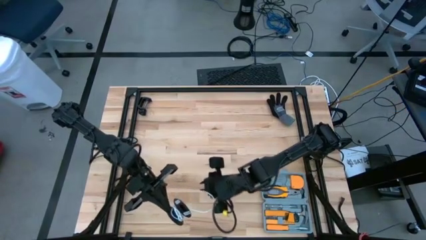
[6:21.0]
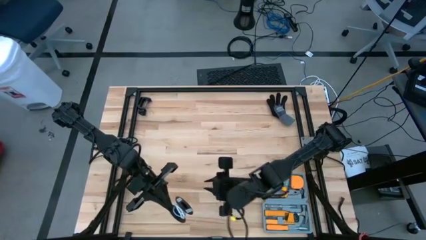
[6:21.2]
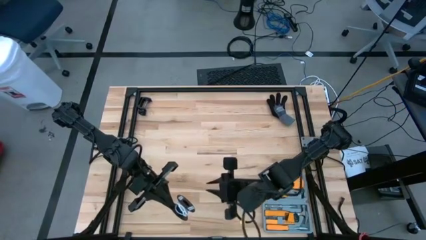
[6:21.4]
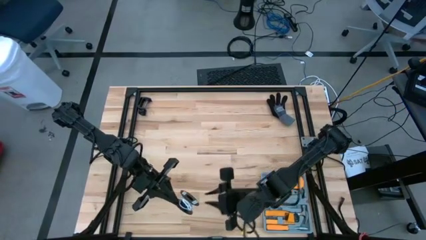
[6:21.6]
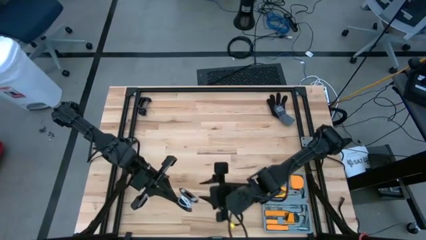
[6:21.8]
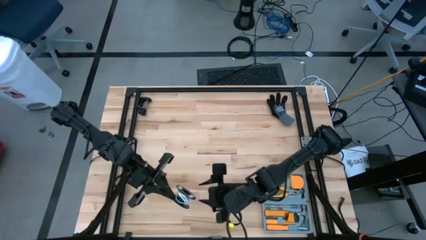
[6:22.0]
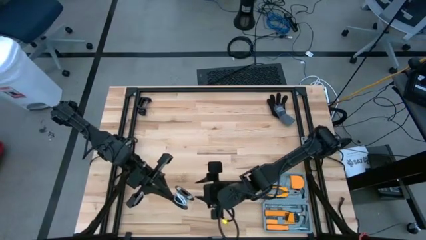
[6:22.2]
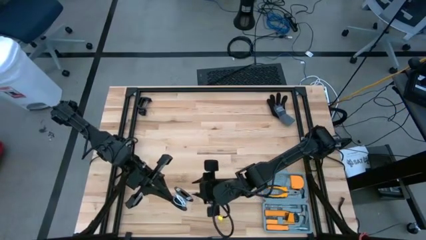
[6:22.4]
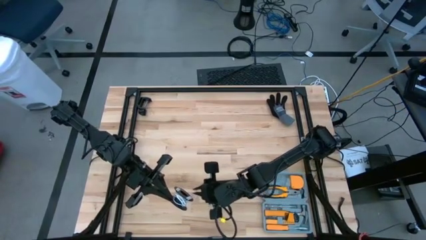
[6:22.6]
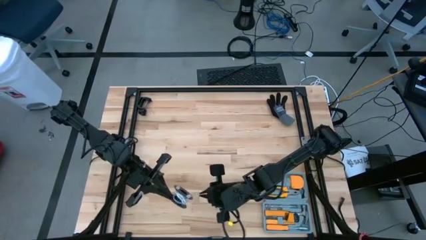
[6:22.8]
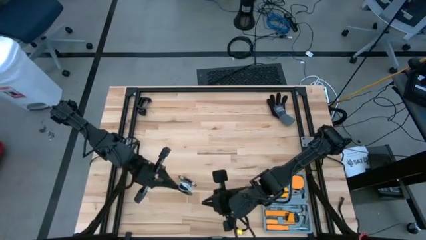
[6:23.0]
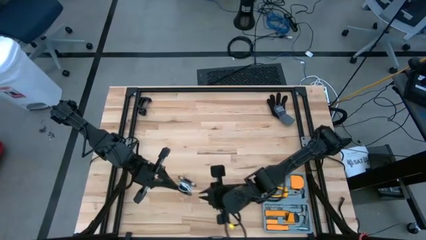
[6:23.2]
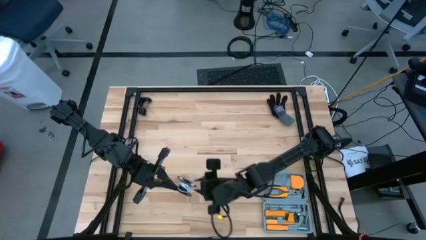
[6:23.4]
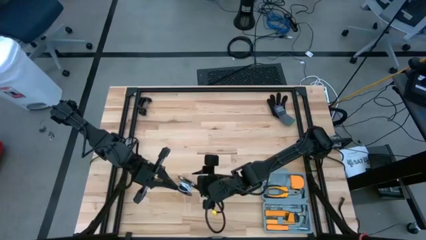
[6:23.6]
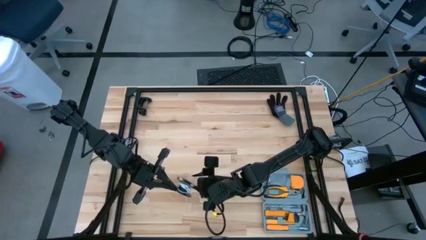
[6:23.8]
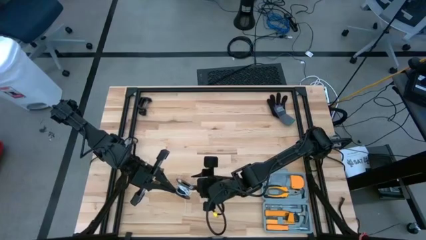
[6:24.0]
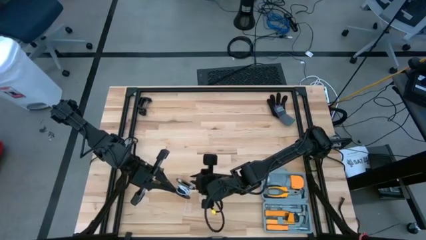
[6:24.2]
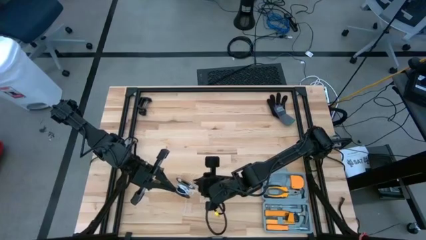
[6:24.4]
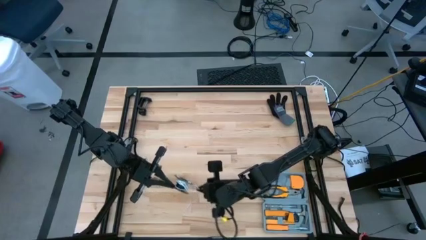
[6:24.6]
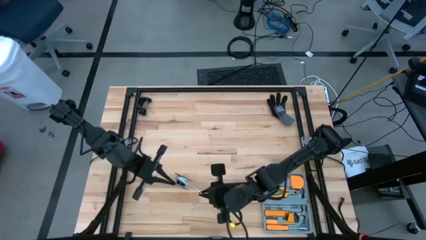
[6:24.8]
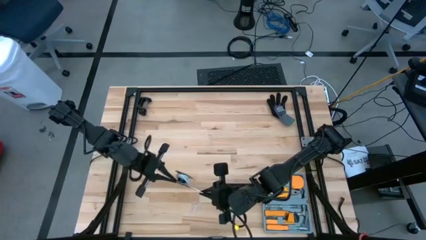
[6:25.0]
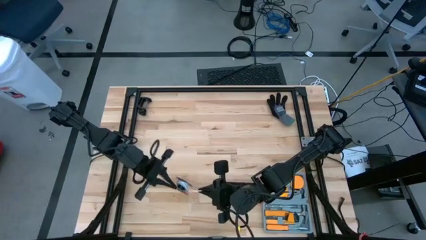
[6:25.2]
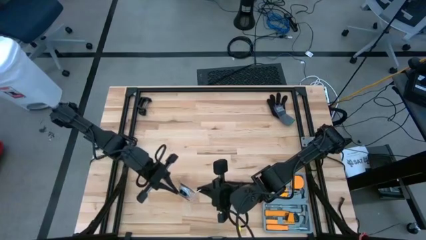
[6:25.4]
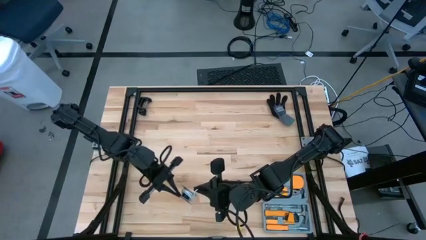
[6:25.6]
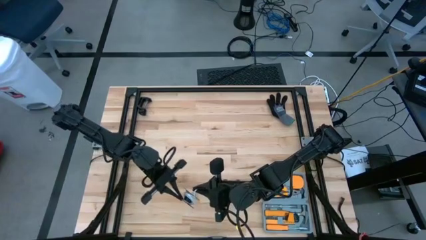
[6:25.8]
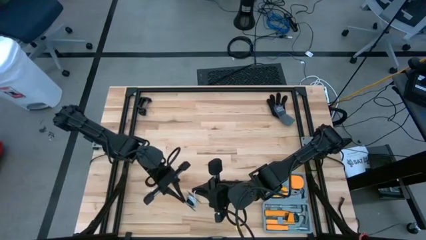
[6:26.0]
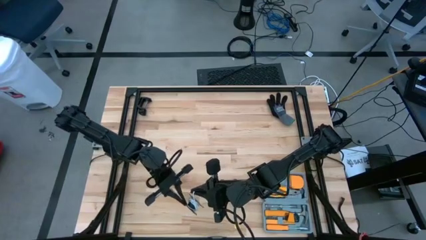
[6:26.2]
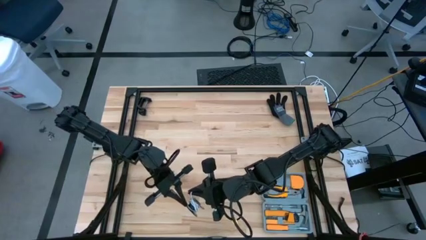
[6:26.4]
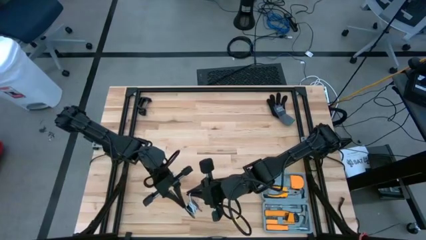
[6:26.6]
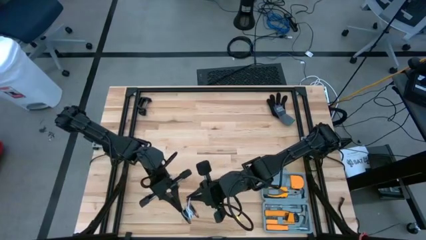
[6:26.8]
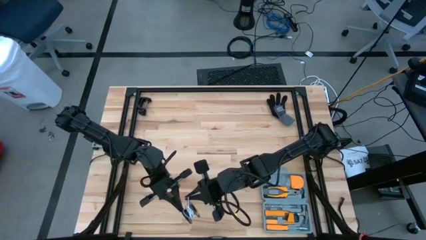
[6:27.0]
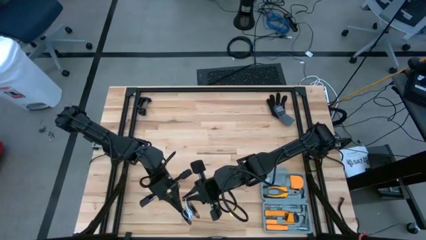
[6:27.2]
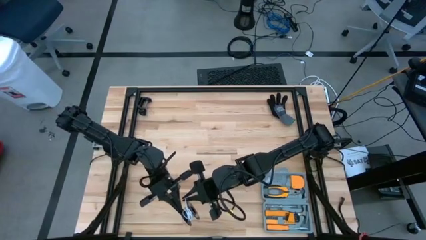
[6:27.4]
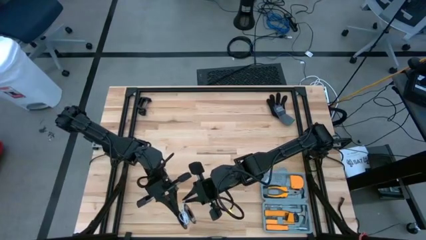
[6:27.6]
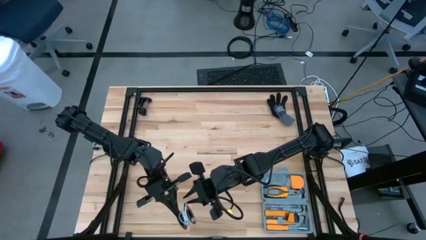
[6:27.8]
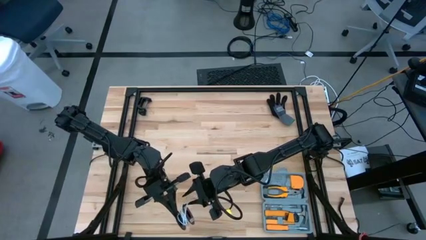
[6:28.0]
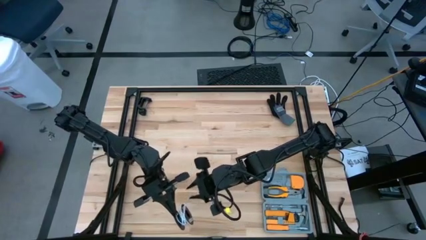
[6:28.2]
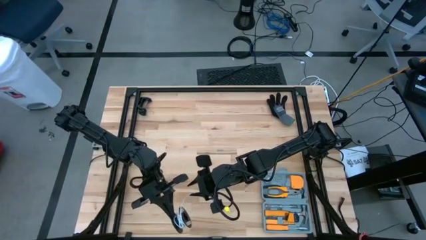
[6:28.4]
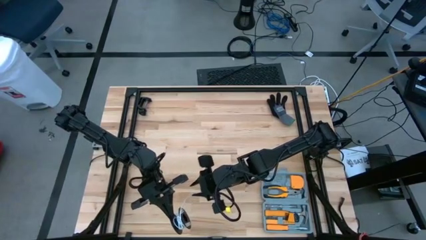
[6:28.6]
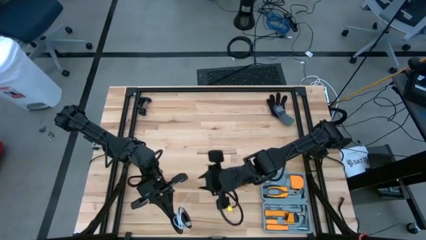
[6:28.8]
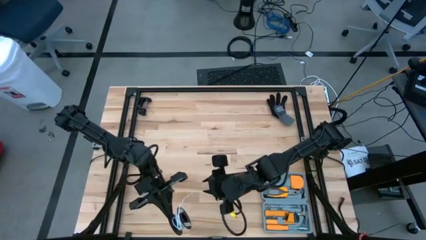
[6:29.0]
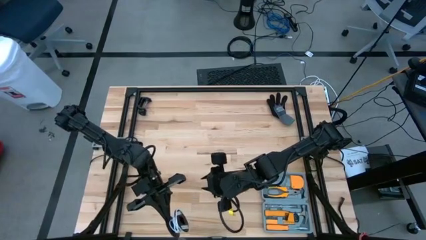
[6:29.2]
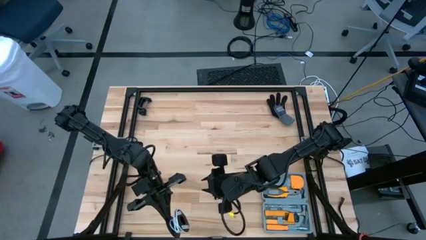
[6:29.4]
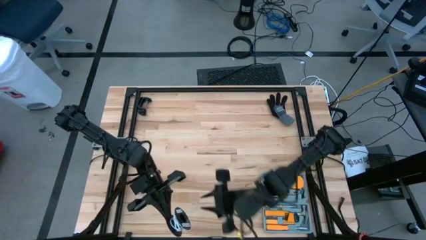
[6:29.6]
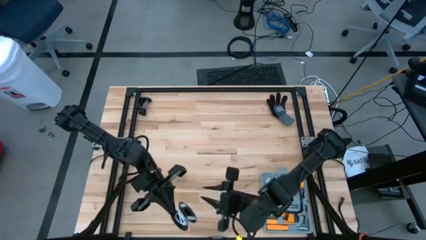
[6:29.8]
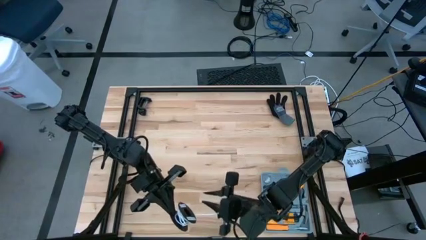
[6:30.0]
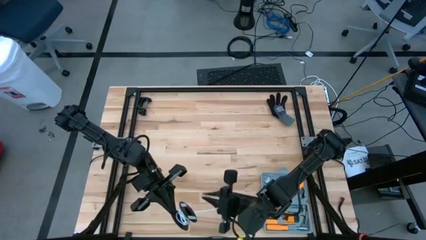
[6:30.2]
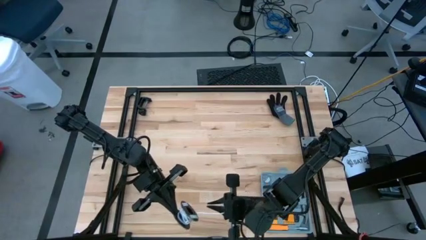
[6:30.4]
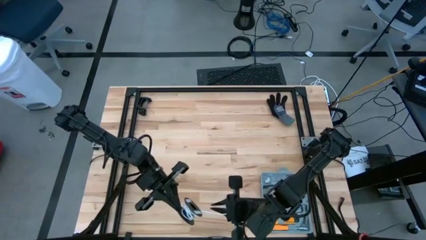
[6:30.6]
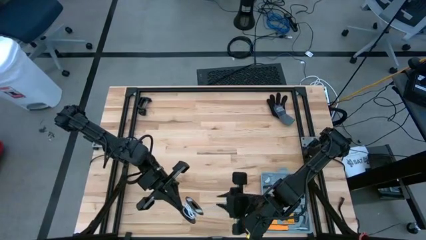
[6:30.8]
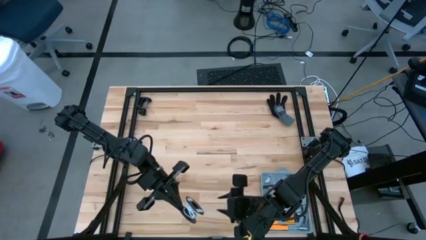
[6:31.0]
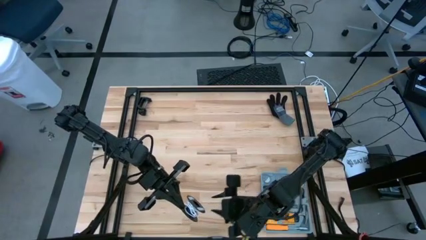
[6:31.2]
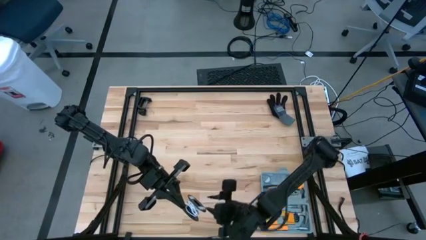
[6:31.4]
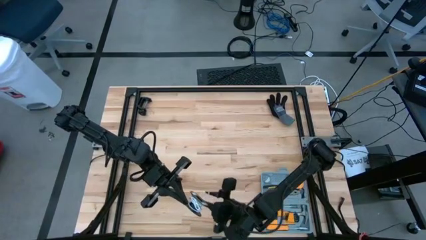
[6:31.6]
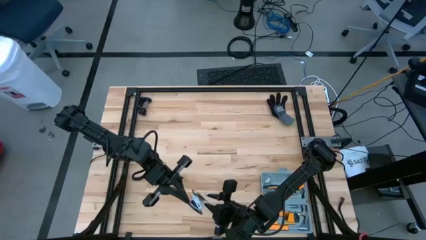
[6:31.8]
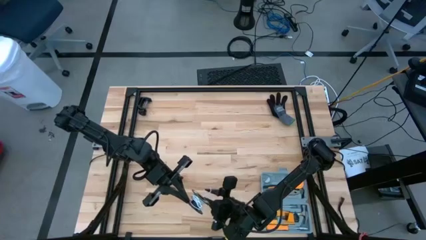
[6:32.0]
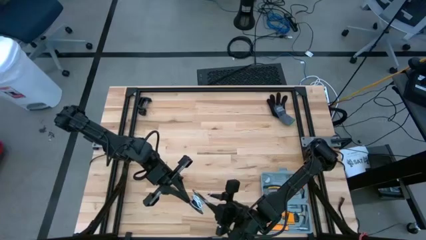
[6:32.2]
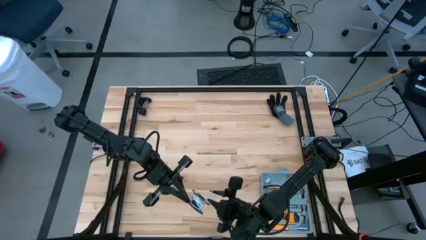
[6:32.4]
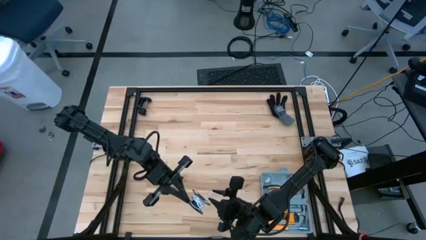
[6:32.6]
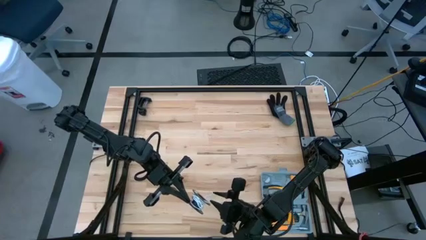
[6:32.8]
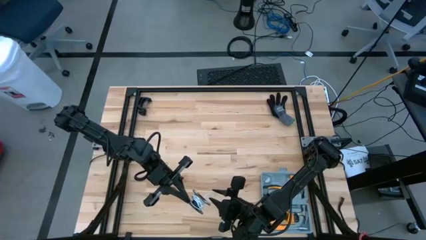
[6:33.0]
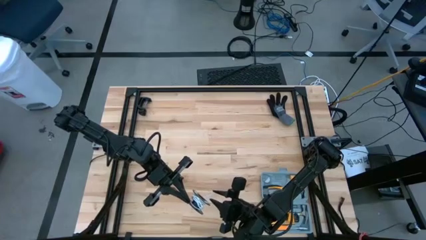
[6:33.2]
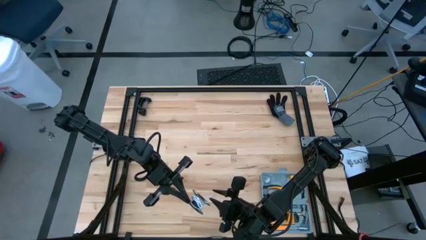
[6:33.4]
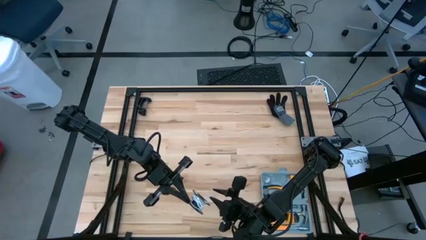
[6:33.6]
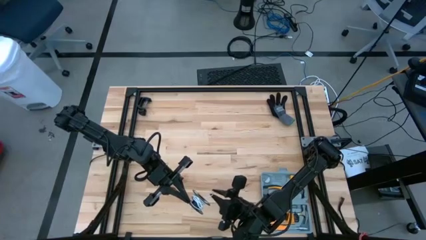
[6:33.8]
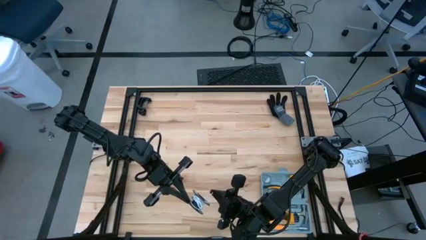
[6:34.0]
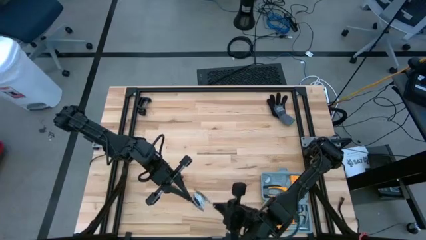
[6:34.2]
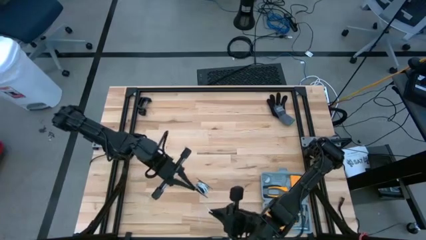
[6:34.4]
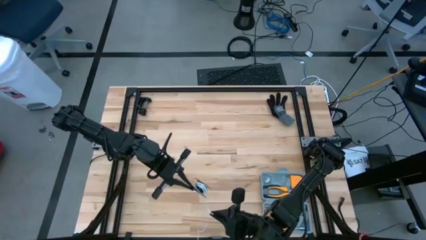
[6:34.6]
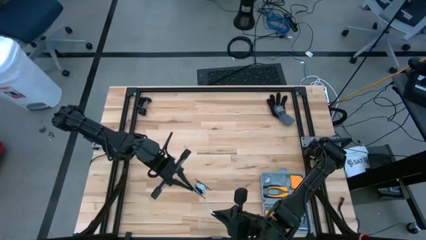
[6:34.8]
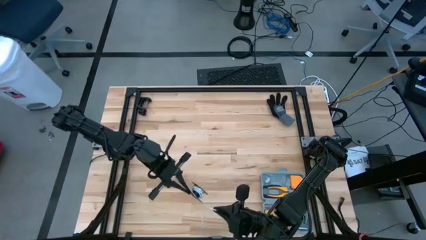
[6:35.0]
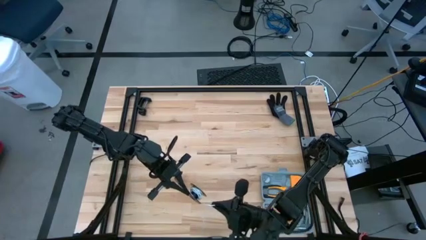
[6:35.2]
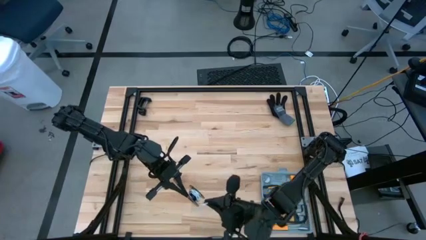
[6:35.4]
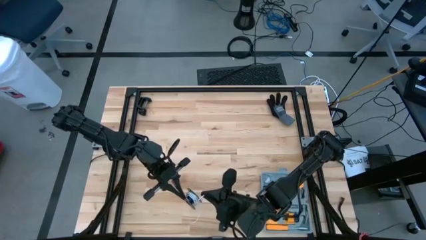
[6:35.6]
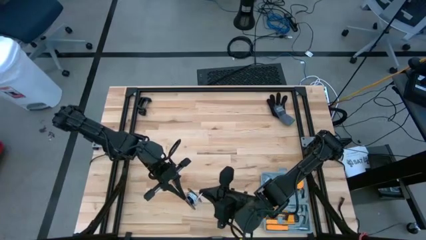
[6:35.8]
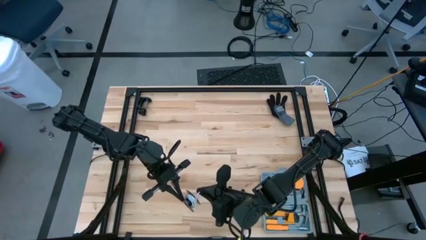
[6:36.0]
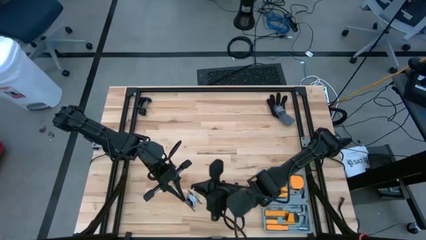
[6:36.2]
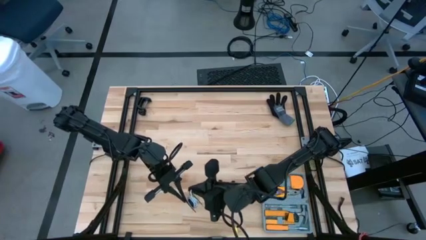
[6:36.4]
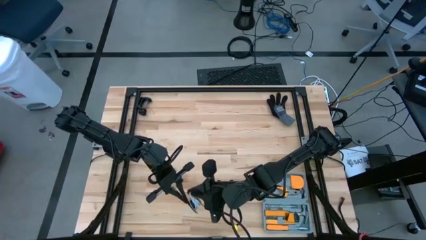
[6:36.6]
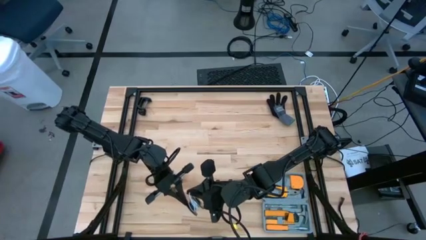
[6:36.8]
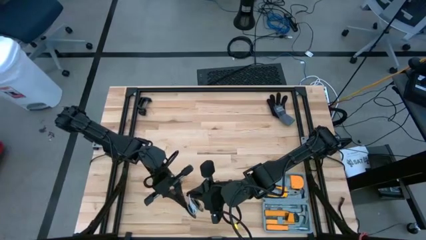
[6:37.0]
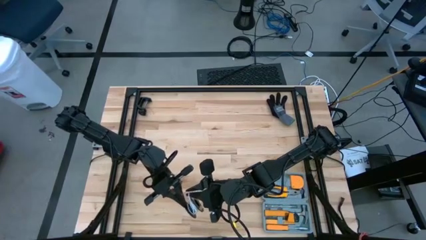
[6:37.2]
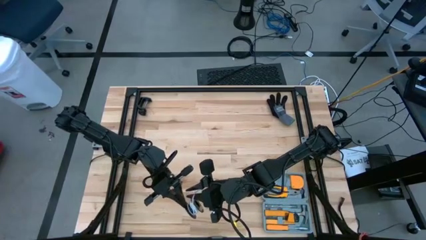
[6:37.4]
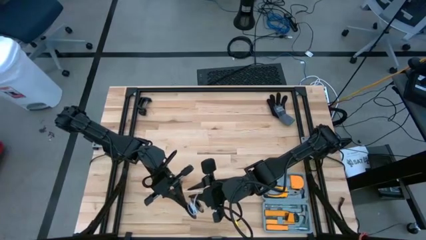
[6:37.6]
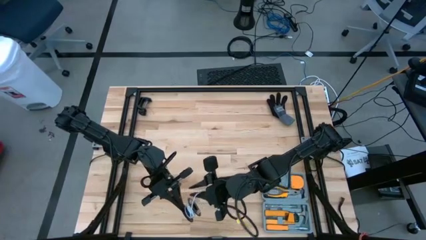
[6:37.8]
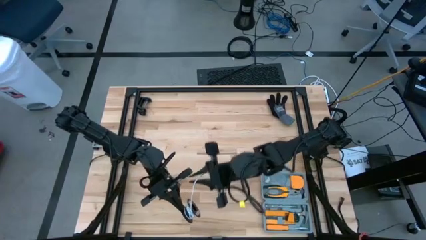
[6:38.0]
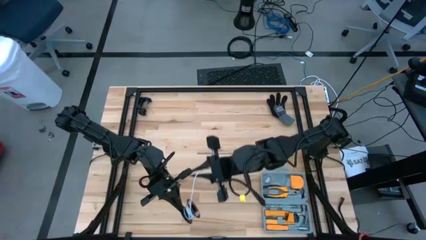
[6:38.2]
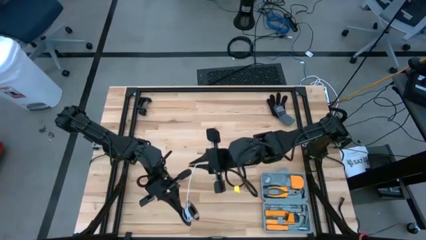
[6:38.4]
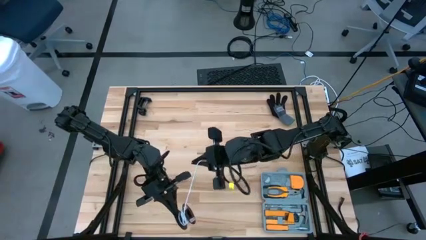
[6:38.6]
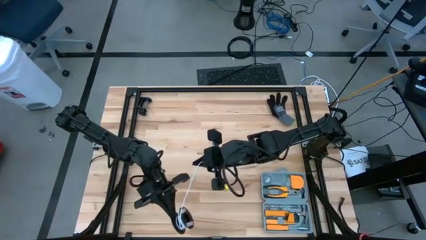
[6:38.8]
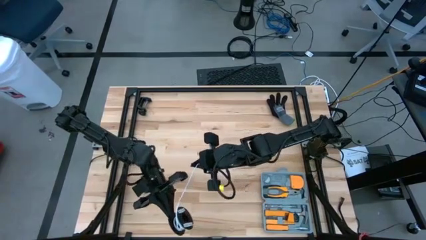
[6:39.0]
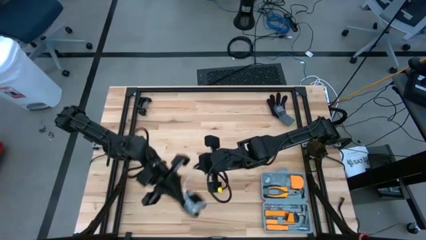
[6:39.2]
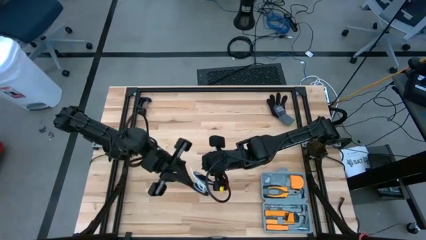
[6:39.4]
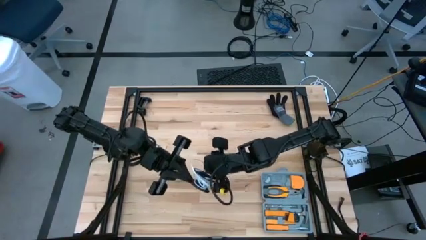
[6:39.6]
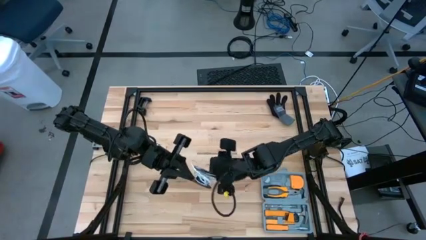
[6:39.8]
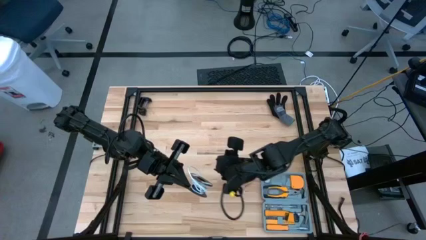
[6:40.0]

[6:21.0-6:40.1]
Task: Coil cords
Coil the white cable wire onto the spool
